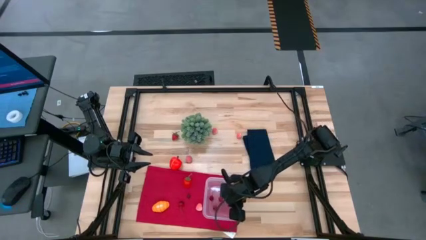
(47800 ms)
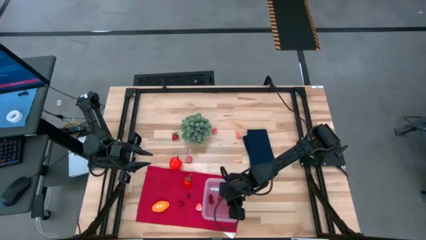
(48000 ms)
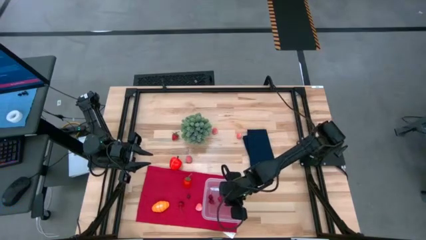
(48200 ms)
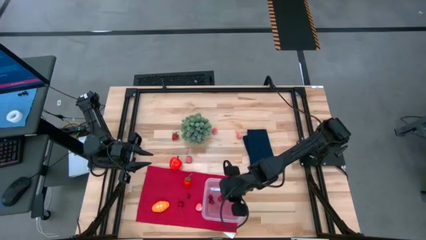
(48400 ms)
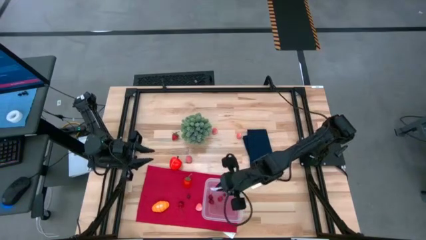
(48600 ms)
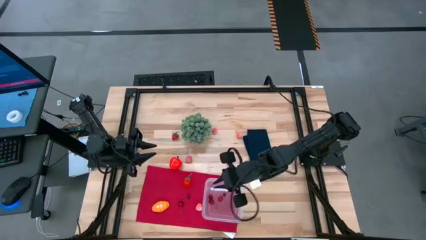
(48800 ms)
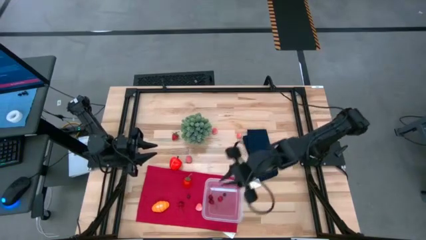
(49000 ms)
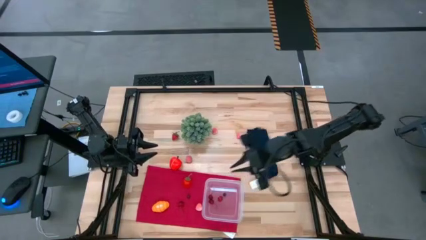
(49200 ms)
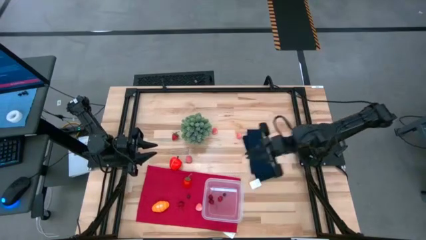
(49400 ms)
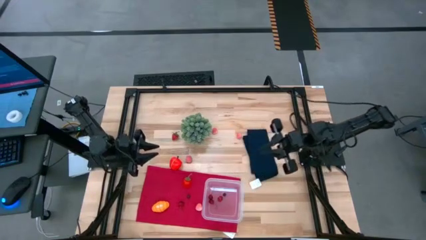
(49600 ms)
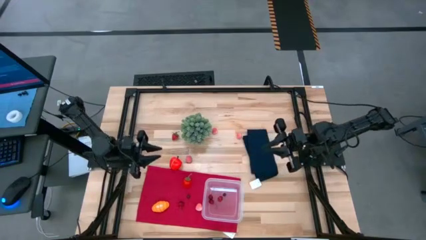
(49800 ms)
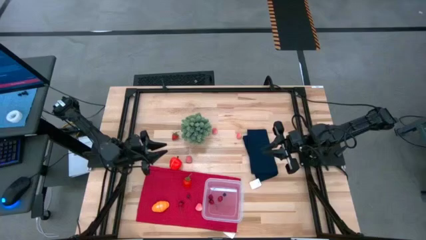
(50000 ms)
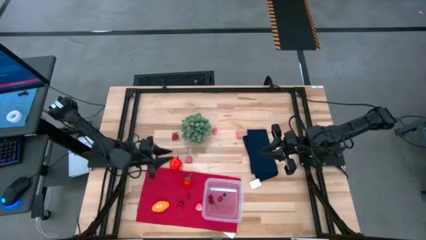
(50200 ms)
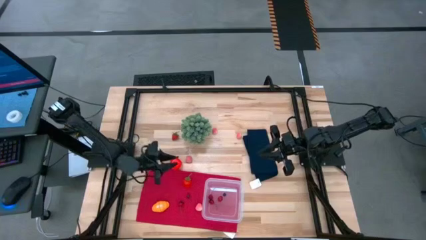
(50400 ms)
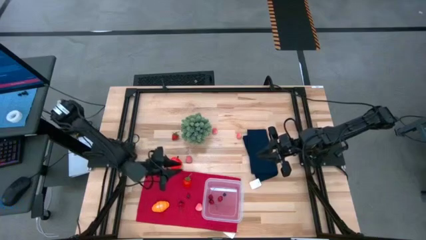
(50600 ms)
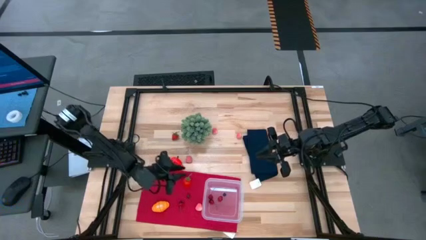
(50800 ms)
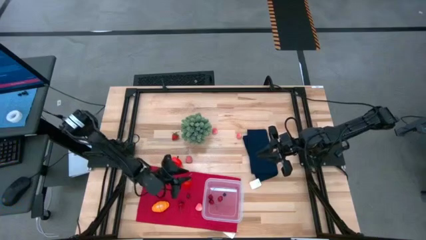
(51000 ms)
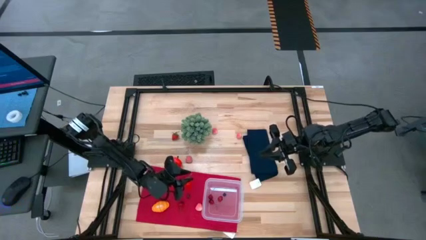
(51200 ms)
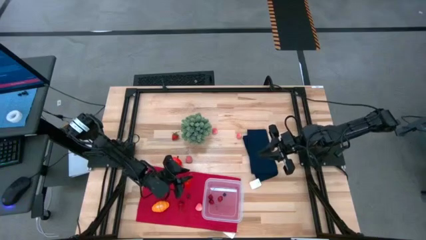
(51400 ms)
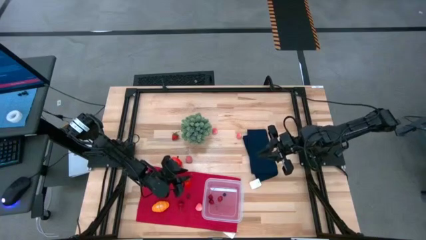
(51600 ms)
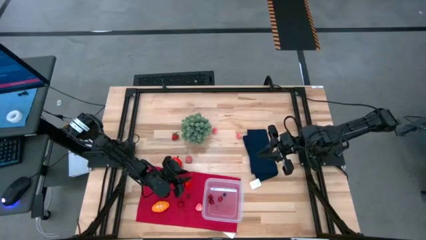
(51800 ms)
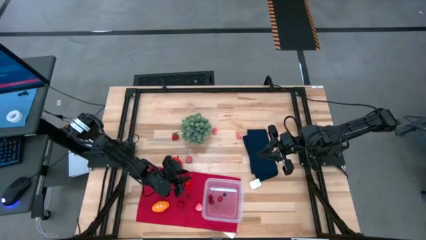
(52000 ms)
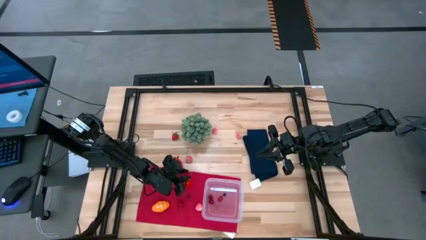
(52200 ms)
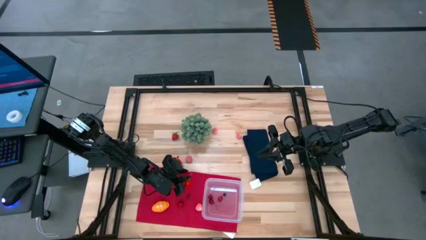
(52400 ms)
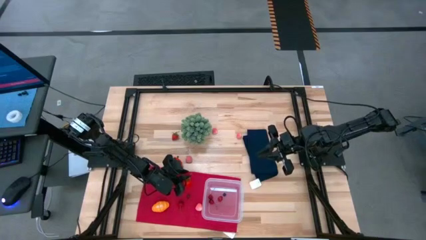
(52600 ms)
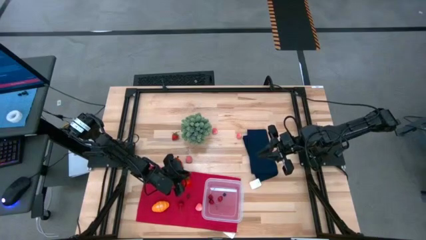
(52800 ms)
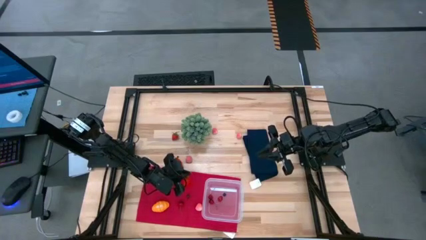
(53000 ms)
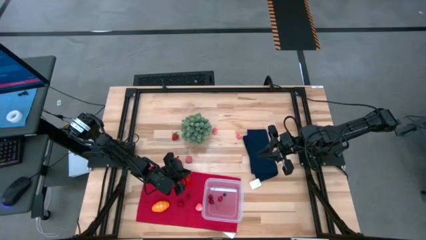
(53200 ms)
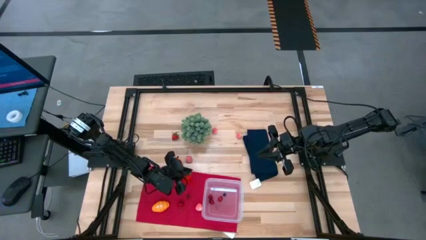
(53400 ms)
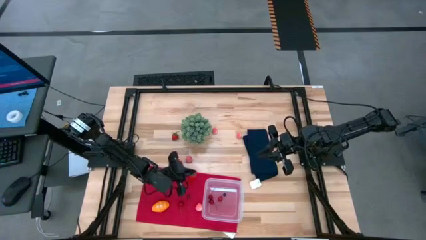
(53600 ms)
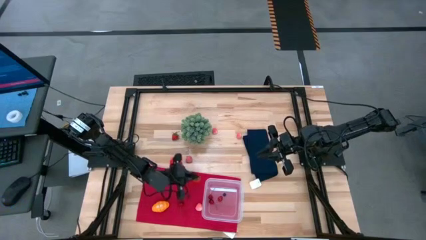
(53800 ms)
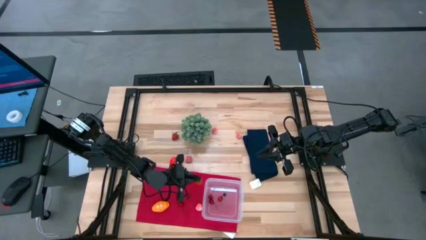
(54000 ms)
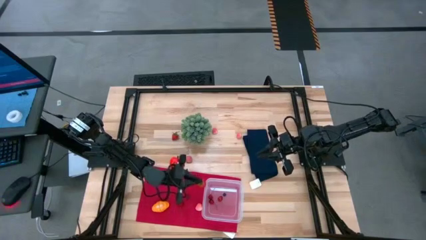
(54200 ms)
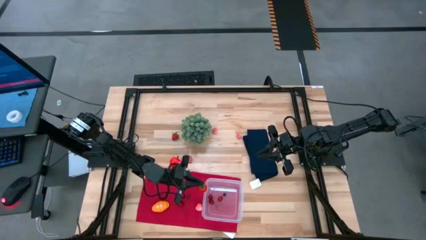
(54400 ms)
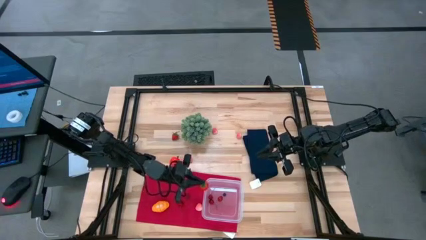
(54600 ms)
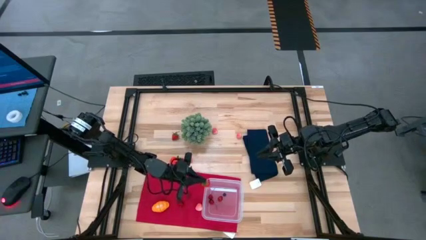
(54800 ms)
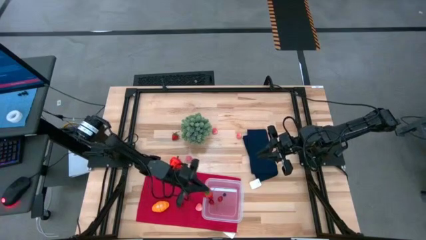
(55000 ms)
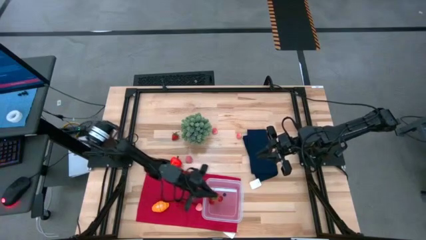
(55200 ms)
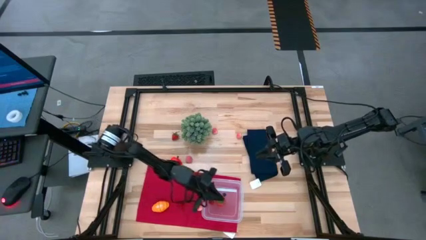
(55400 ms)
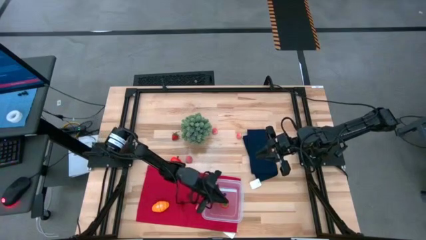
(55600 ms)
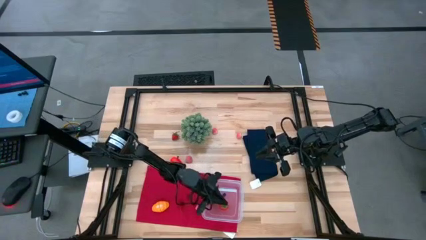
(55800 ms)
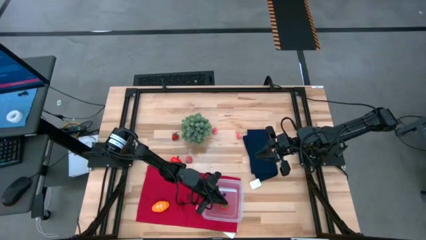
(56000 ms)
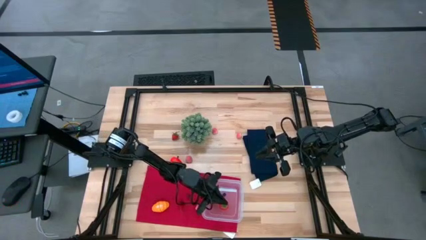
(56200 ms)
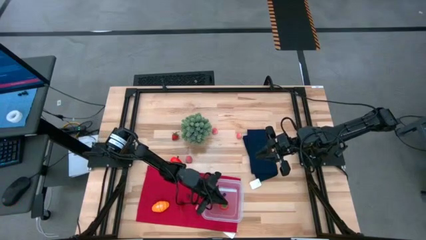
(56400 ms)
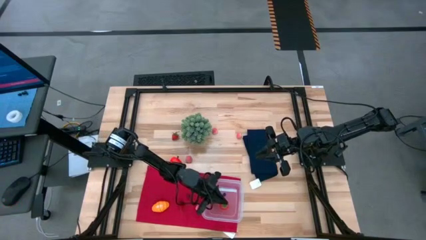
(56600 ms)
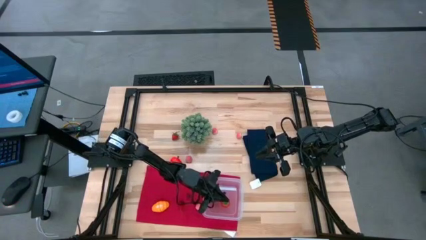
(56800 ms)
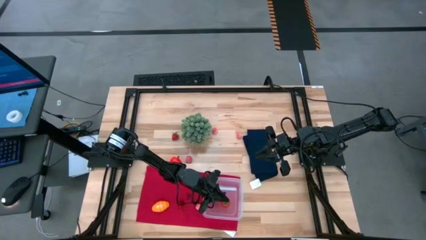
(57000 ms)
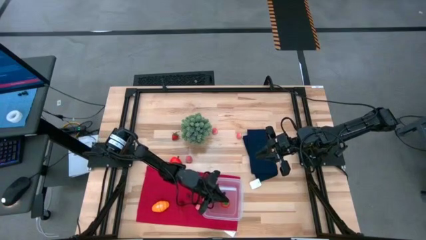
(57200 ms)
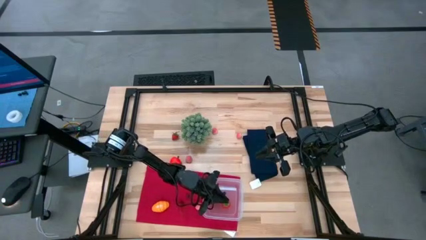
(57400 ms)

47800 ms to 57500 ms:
Task: Pick and placing Produce into tupperware
Put the bottom strawberry into the transparent bin

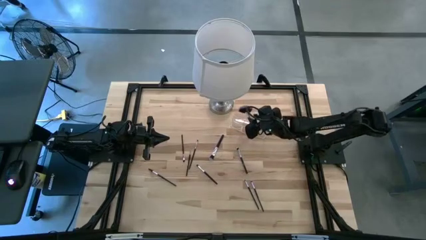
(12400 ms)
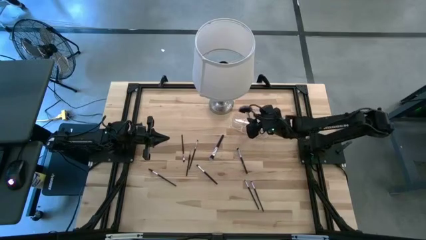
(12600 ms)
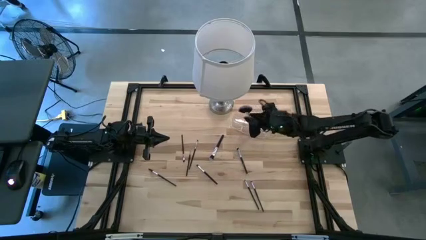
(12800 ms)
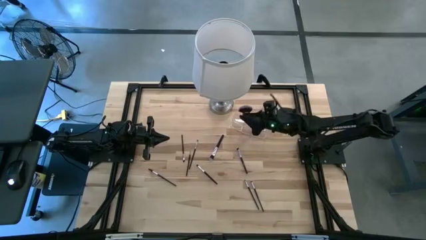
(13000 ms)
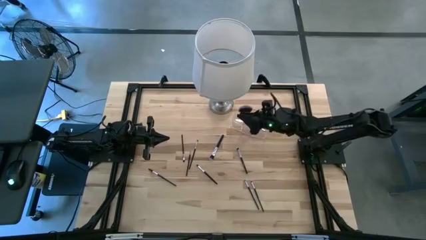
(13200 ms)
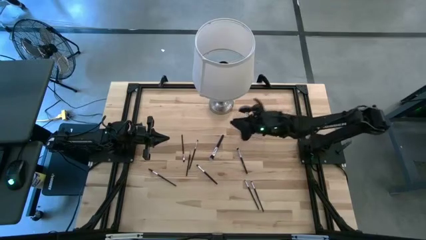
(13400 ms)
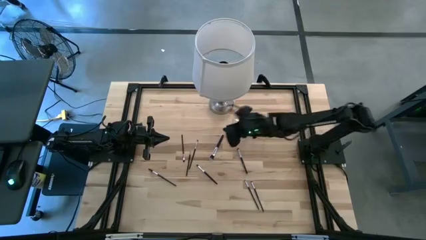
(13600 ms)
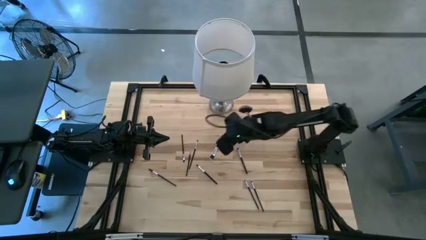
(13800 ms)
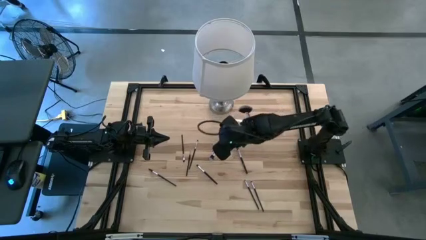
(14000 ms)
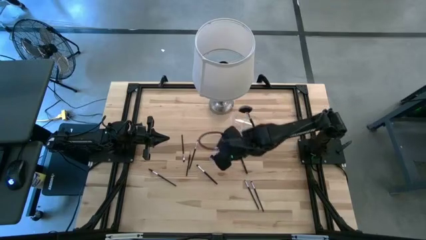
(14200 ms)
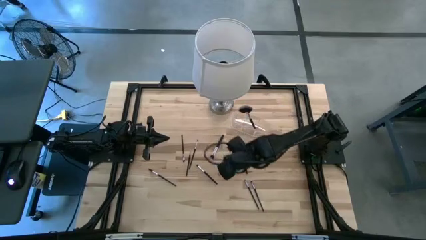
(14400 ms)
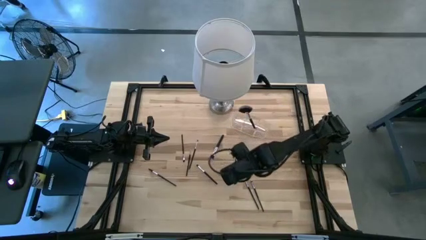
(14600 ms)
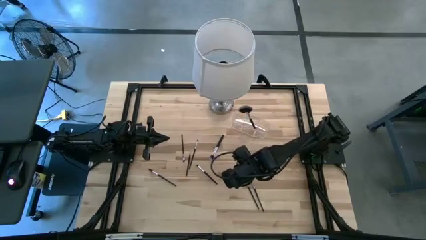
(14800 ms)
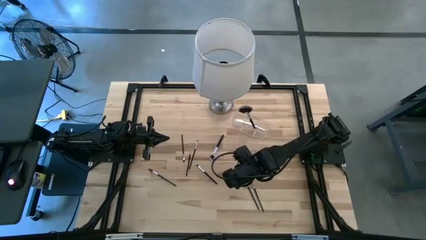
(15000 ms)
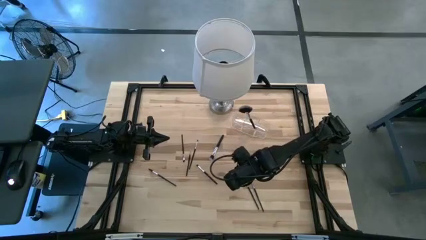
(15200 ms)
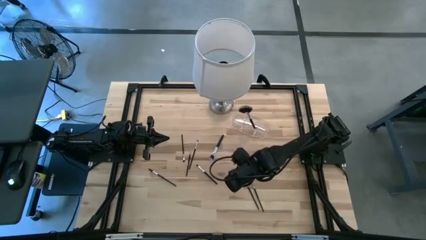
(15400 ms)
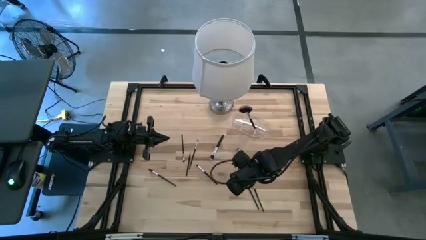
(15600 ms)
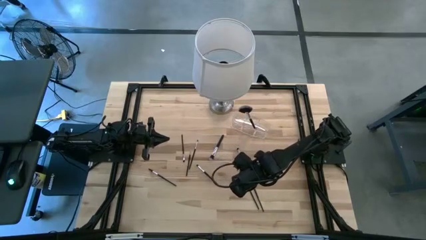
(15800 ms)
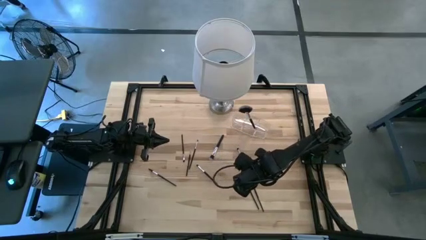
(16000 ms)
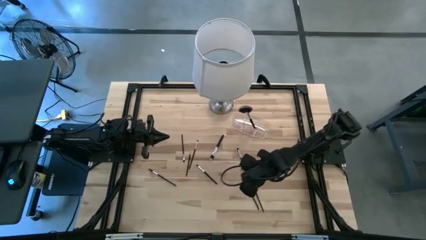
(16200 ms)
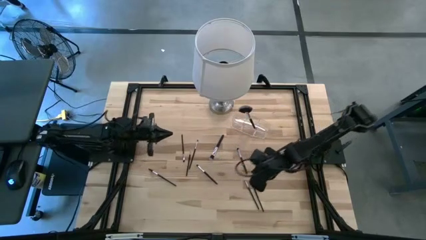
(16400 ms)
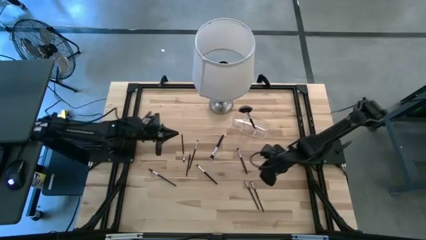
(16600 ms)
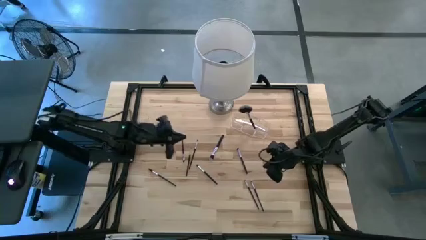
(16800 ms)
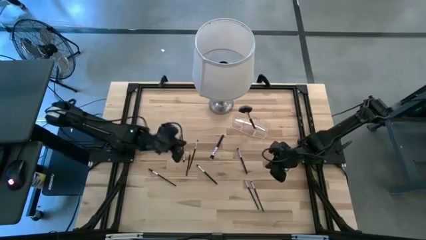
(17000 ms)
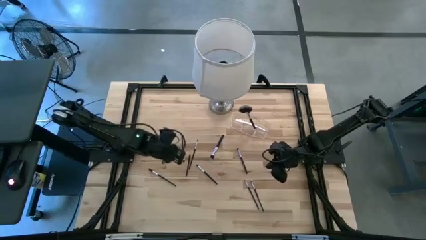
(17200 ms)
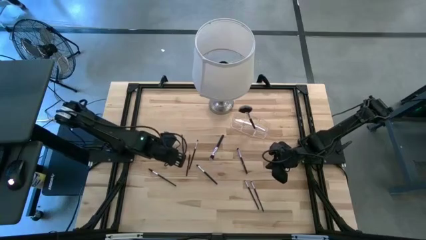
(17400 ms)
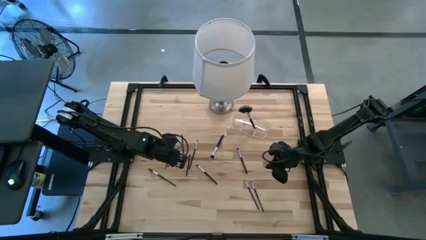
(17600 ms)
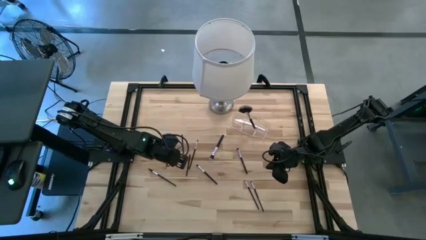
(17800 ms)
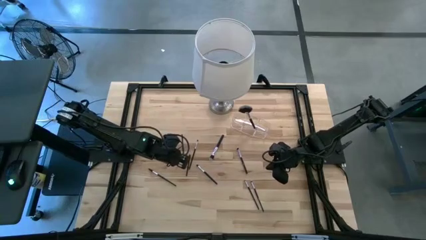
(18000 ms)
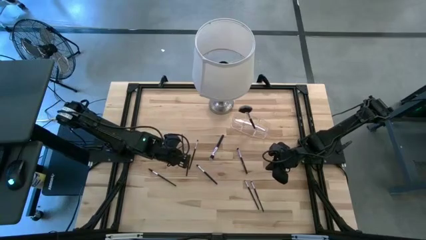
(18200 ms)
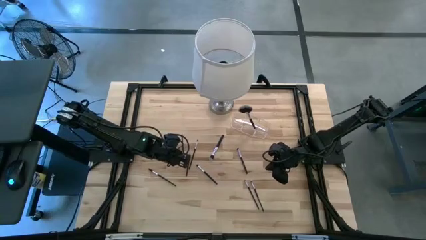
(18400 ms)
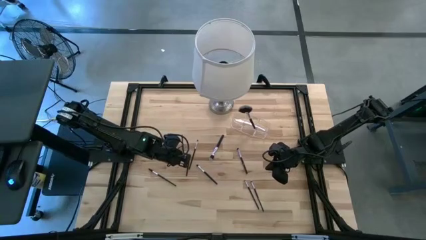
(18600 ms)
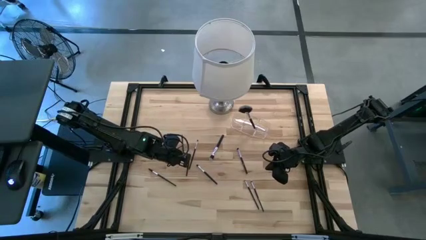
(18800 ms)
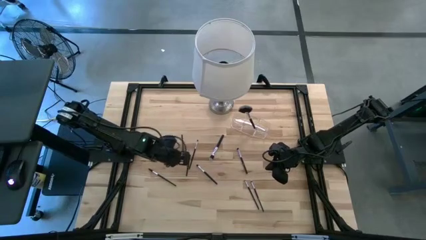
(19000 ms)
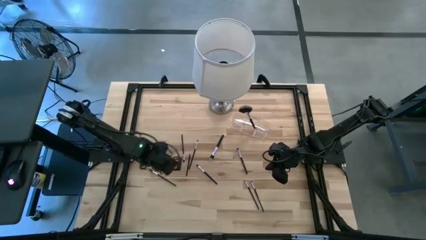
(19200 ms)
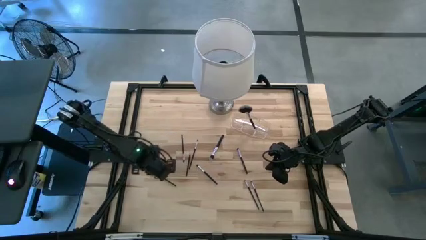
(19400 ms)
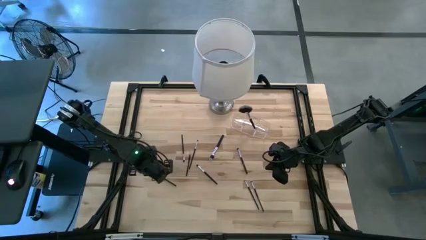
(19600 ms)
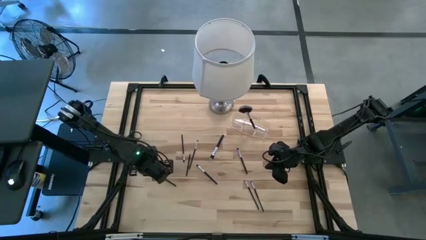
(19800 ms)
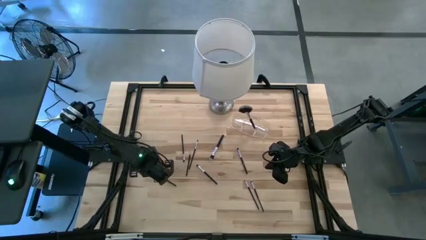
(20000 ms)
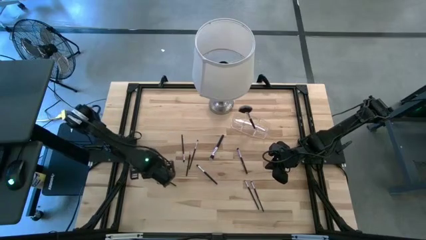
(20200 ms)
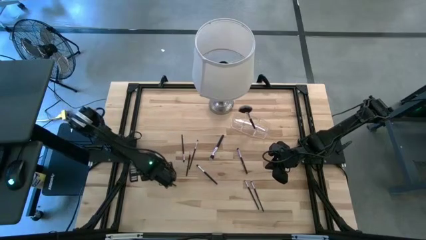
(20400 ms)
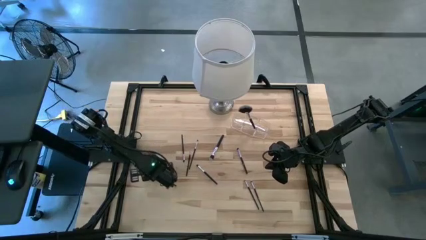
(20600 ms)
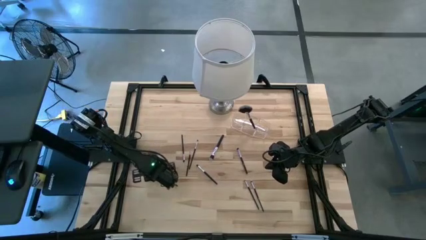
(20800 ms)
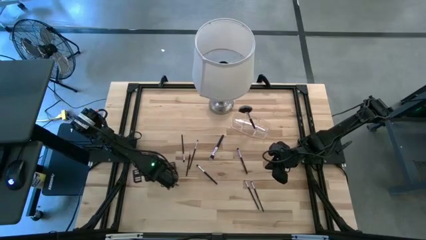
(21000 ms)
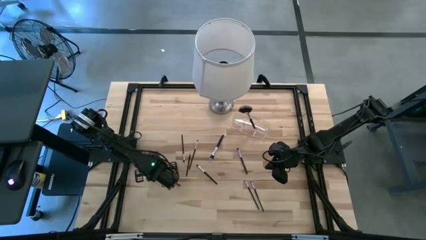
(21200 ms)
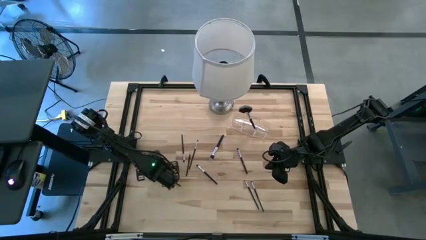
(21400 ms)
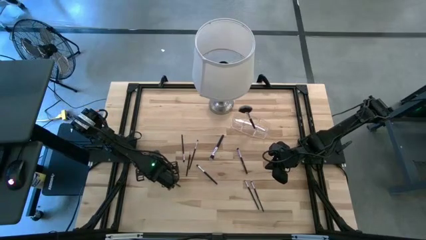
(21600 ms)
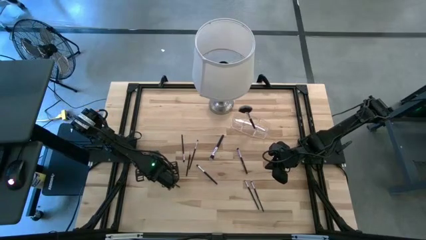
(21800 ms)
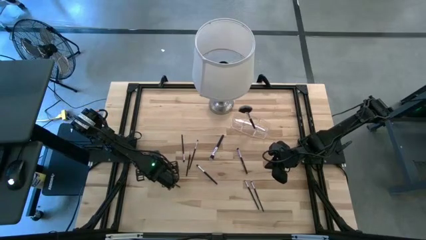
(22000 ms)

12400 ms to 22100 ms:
Task: Put items in baskets/containers
Put the black lash brush into the transparent organizer
